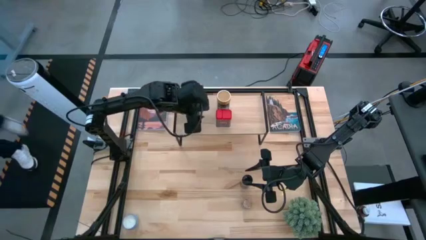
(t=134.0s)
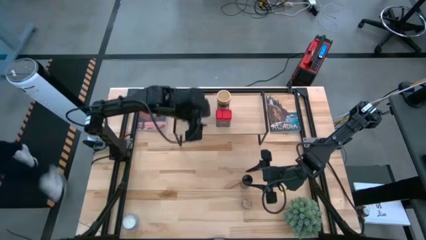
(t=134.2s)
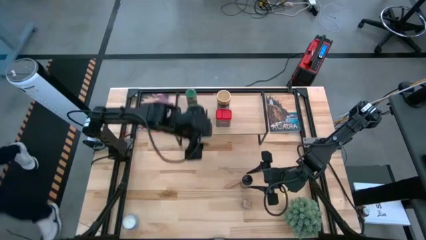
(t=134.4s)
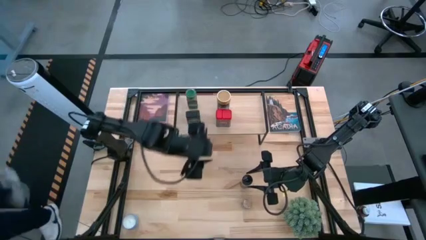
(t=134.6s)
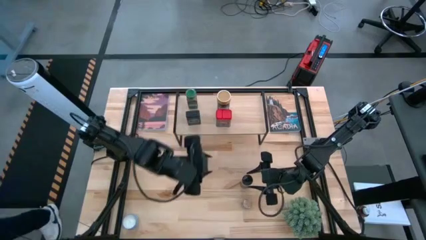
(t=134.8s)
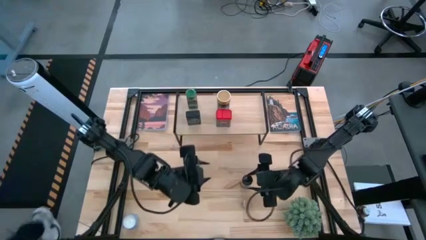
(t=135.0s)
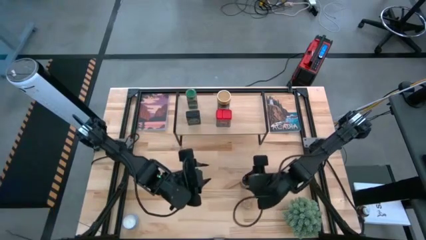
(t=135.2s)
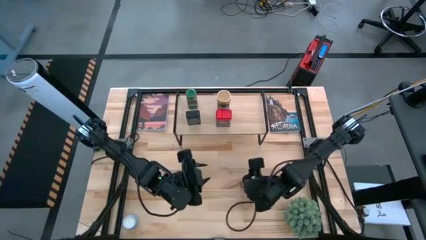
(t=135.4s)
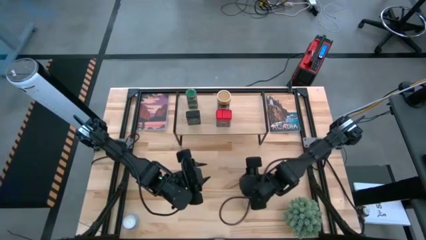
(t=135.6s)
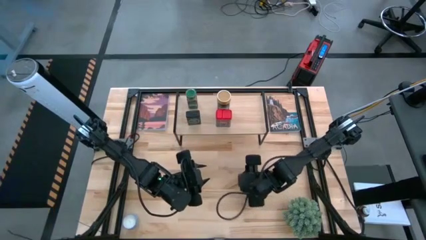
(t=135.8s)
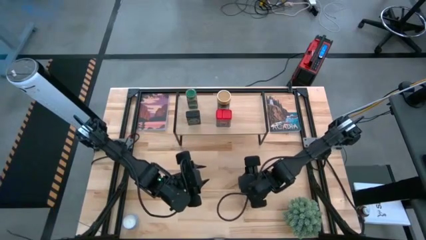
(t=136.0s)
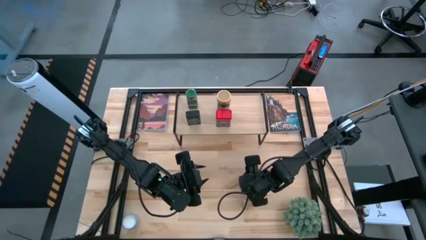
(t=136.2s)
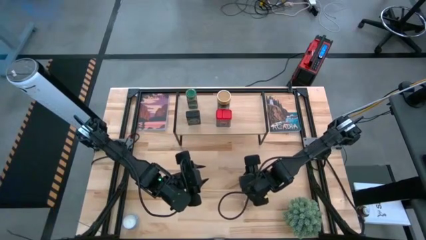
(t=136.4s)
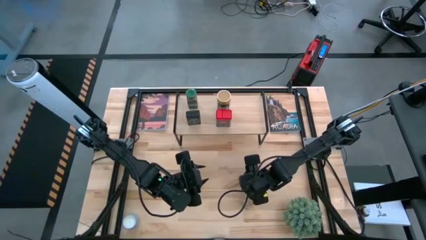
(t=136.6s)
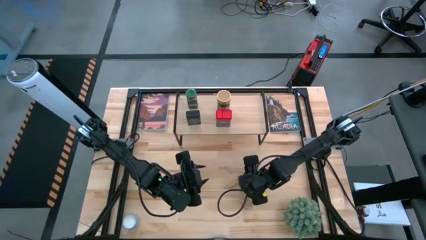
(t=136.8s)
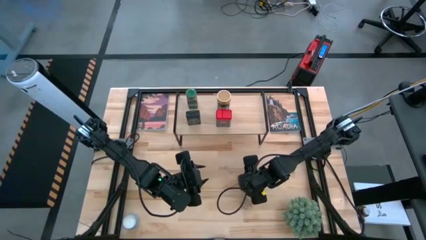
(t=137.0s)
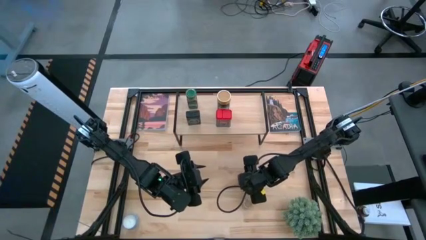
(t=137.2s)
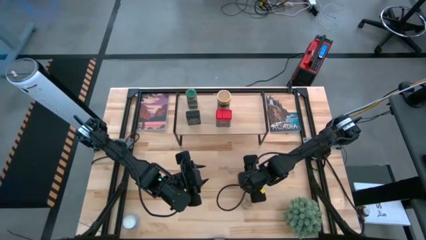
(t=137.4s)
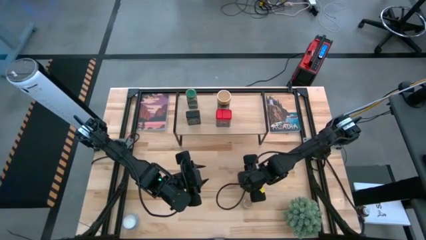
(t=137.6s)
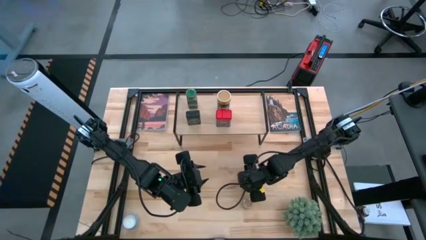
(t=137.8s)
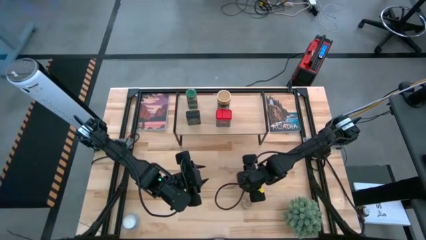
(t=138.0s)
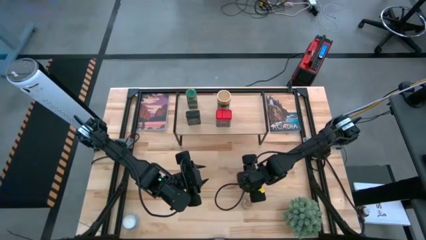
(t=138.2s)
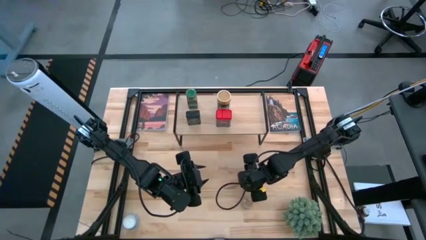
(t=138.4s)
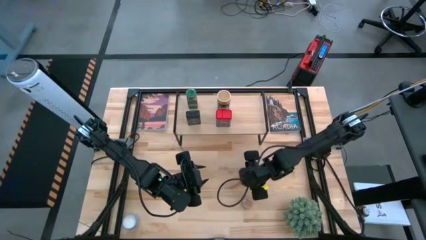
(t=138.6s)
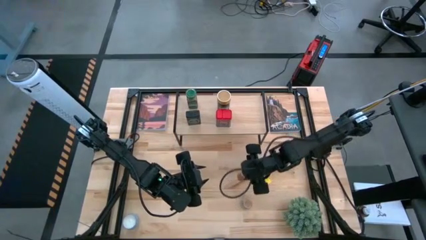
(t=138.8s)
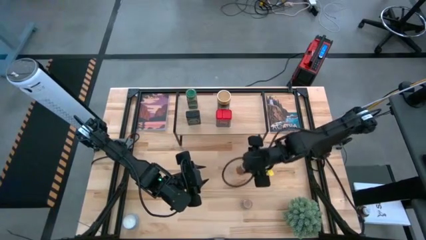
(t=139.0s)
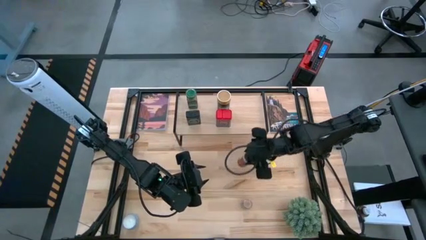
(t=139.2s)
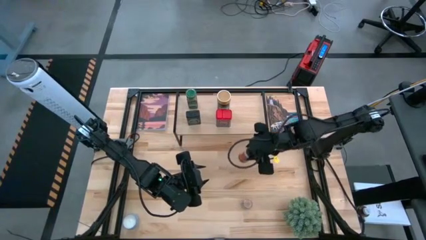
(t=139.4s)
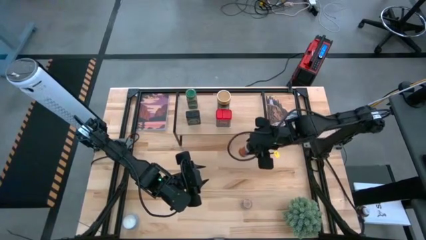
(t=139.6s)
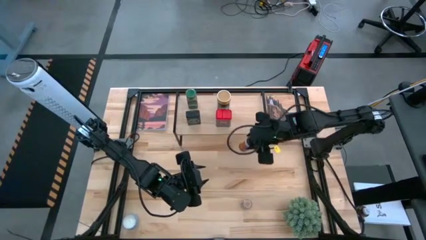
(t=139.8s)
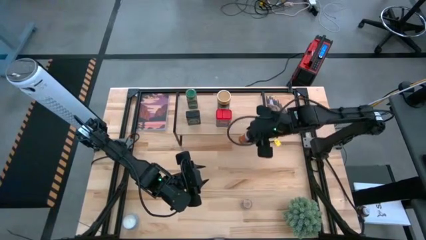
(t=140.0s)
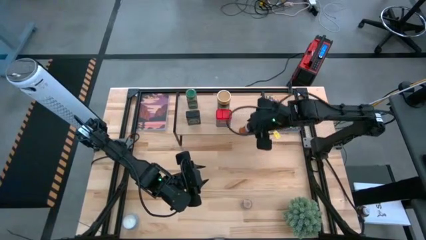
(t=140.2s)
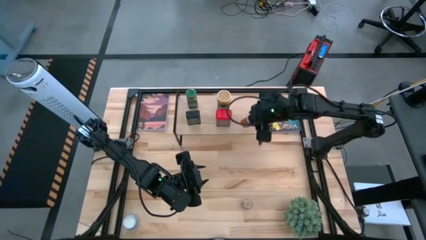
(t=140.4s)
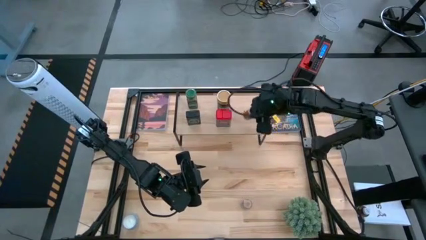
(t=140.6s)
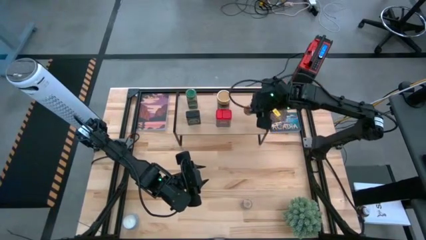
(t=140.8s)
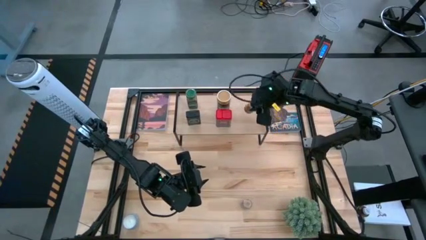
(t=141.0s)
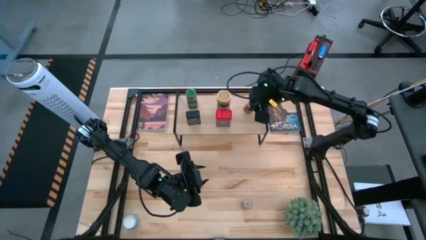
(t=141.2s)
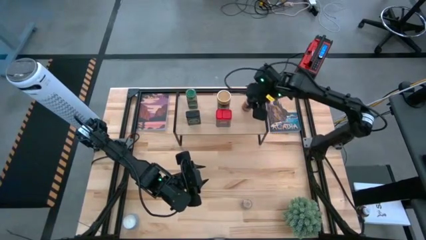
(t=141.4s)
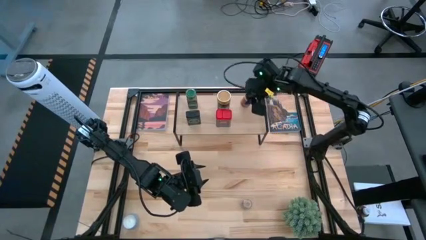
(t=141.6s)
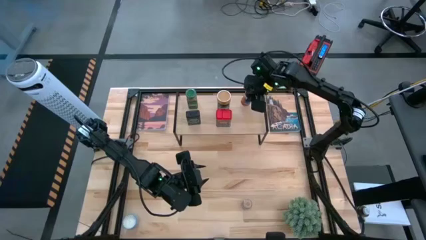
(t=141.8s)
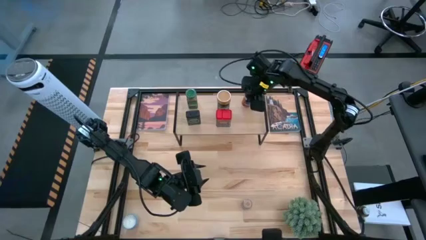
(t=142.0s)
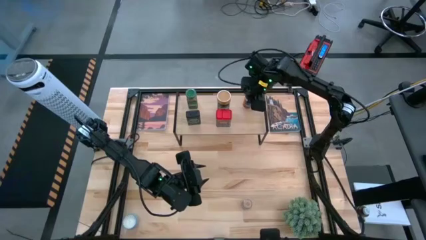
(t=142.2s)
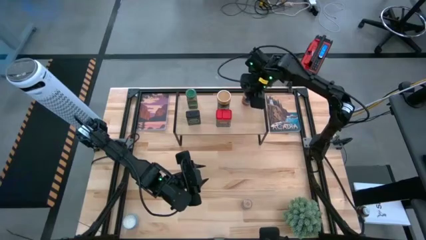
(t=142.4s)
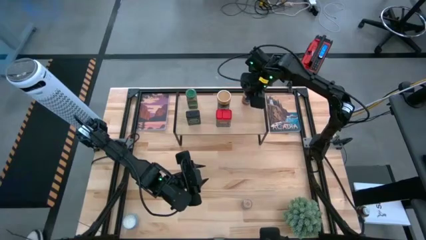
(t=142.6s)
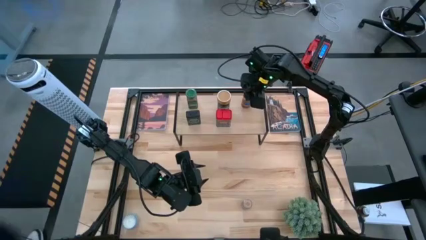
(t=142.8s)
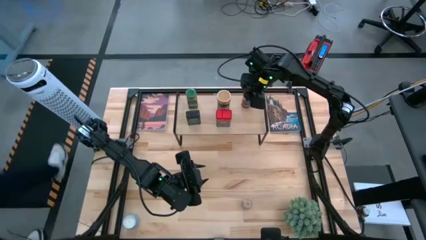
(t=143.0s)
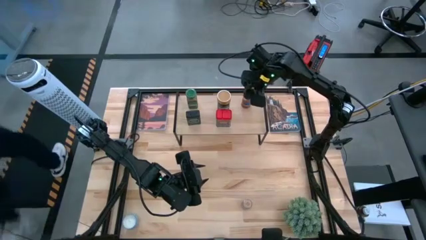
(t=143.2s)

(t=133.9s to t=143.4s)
Task: Shelf spices
Put the black seasoning bottle on the shelf

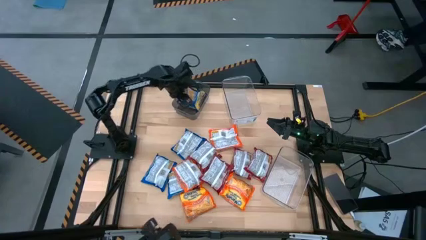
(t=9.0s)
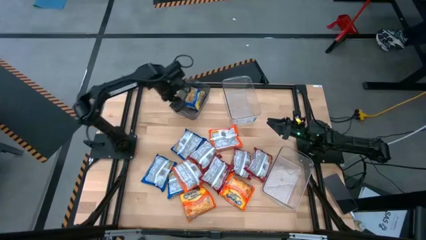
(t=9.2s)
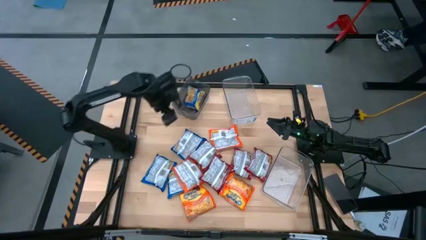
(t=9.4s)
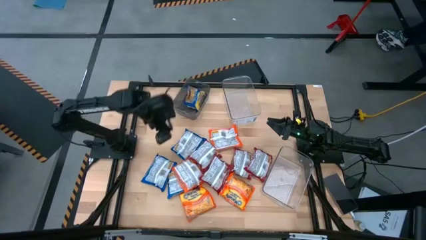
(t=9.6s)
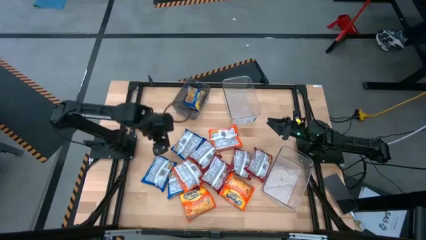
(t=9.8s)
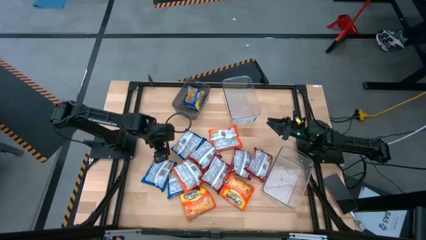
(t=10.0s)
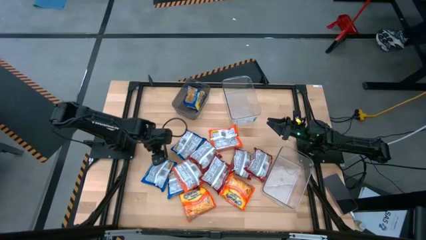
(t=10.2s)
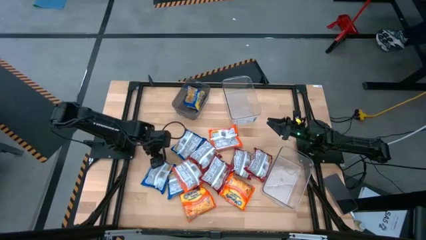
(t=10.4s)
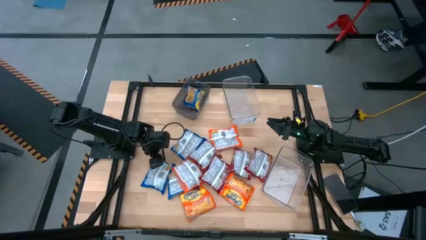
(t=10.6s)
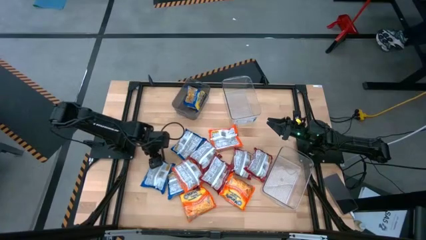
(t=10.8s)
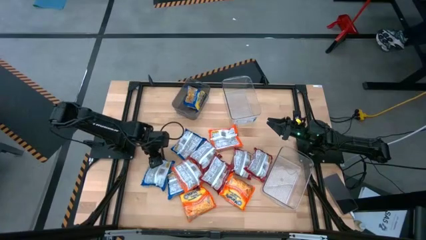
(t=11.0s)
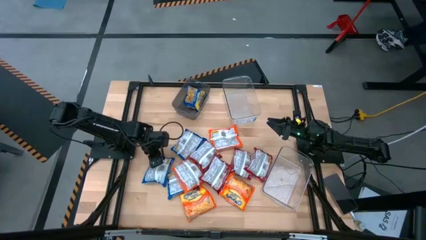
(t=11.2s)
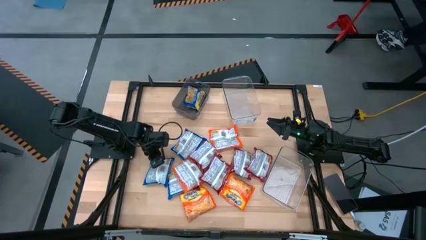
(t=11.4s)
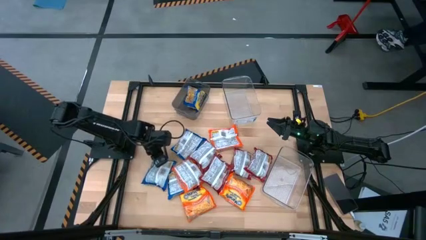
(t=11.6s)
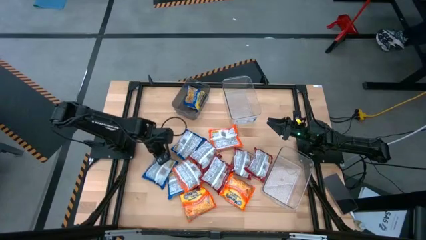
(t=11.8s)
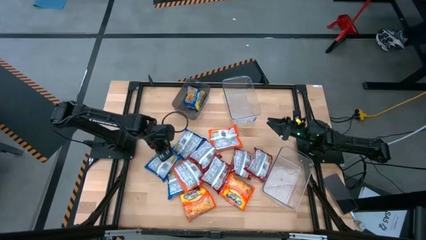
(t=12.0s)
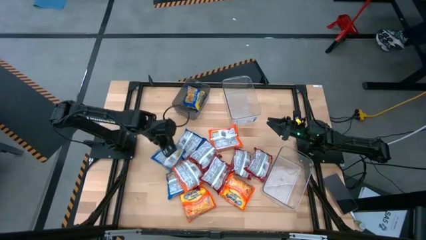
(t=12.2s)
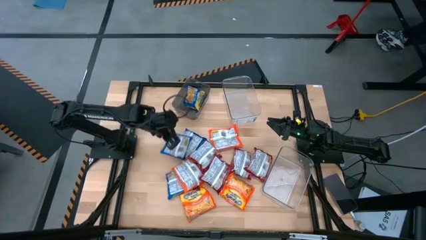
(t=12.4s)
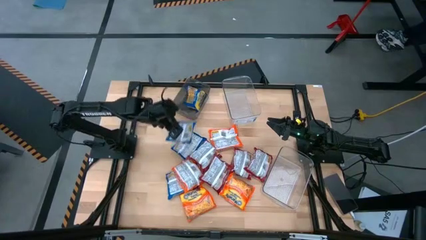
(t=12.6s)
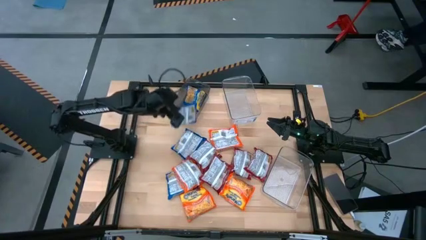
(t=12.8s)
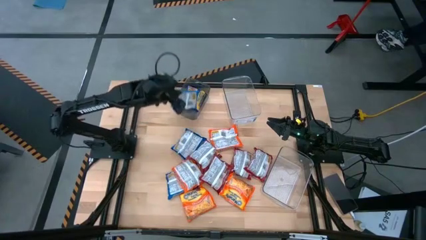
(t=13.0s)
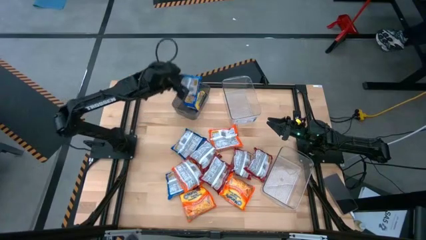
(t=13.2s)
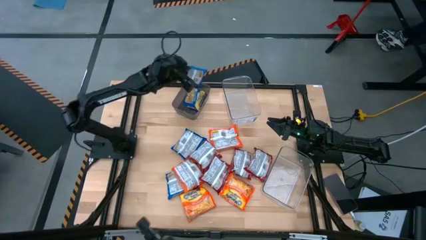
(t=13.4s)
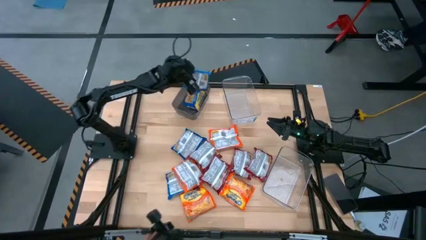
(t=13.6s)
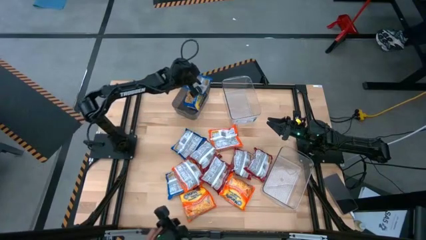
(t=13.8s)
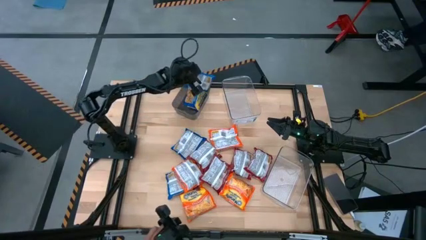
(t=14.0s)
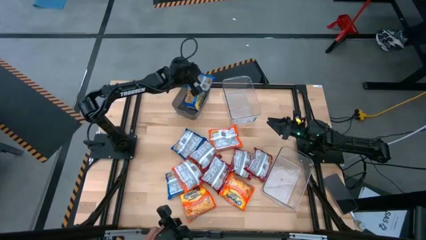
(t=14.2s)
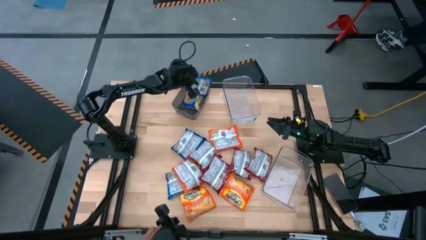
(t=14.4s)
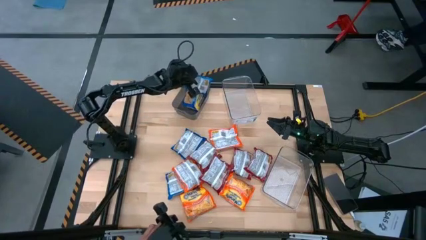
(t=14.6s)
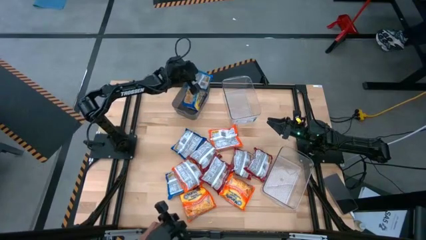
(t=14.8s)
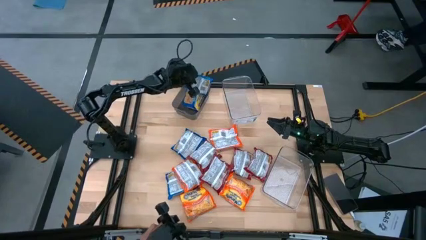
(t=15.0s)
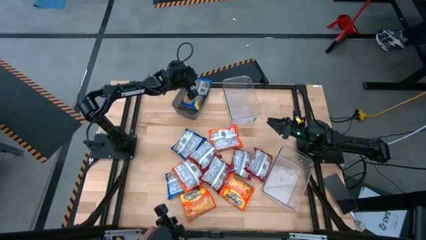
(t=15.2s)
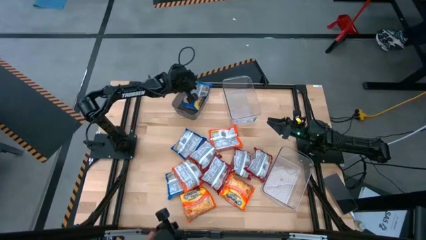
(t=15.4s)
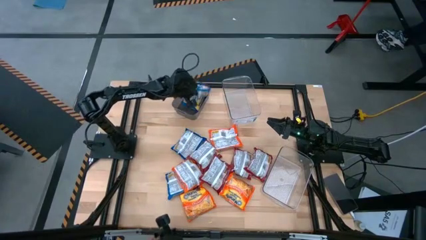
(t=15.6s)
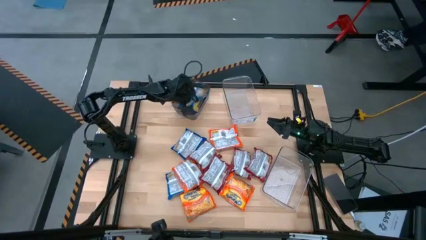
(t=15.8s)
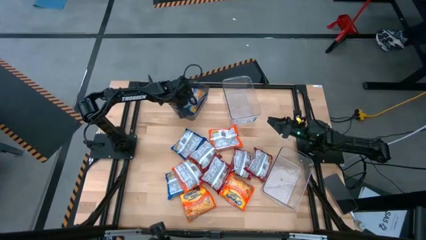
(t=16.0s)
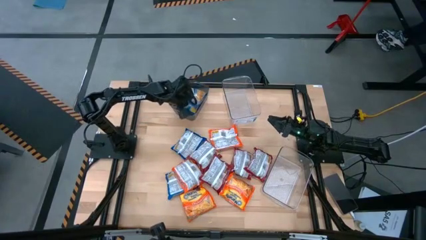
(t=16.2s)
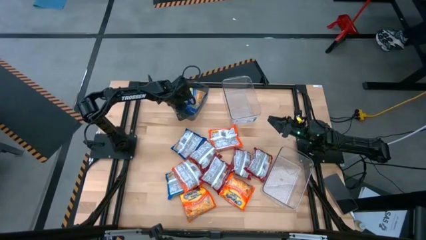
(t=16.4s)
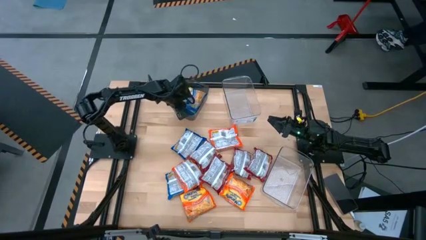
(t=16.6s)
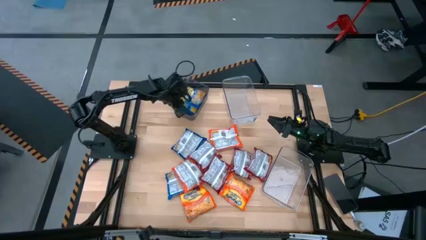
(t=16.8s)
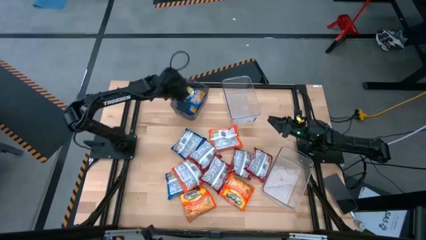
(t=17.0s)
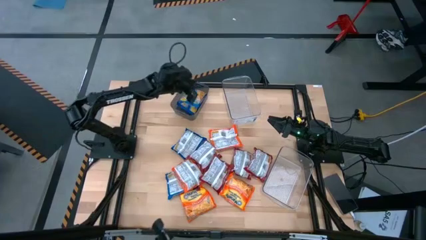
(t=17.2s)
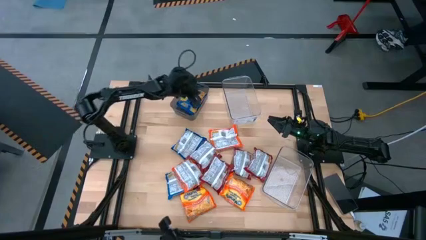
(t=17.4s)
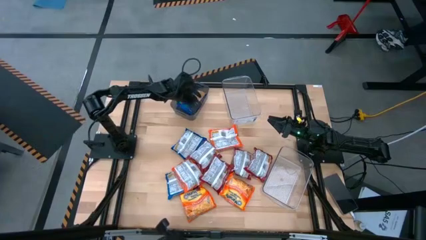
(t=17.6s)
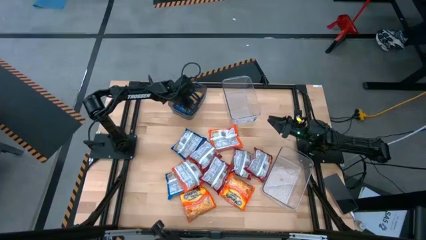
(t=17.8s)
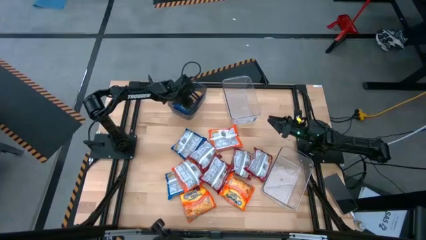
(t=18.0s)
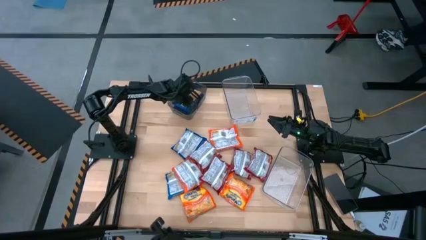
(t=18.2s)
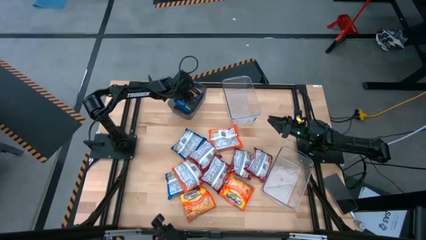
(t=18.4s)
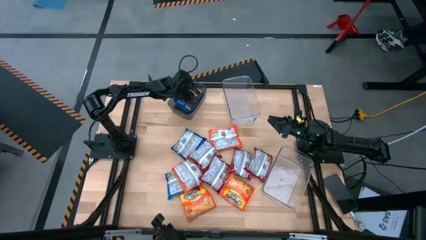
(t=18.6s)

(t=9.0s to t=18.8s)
Task: Sort Maruchan noodles
Put the blue noodle pack into the black bin
